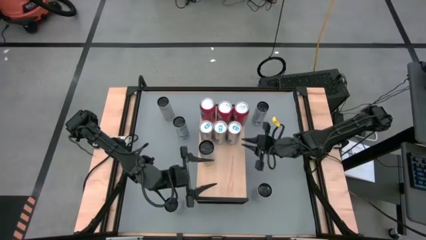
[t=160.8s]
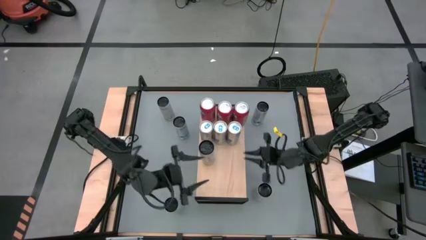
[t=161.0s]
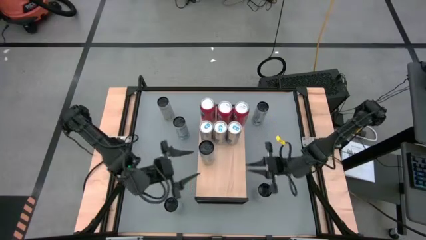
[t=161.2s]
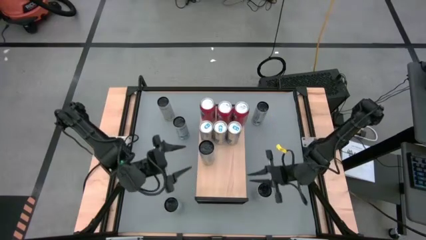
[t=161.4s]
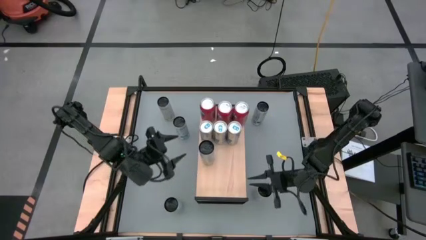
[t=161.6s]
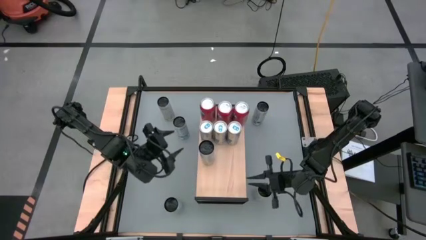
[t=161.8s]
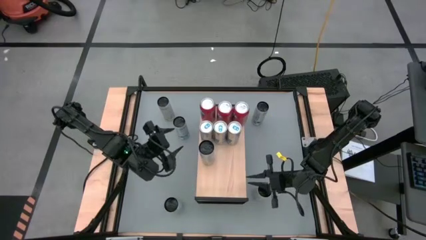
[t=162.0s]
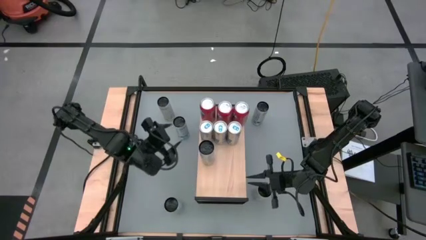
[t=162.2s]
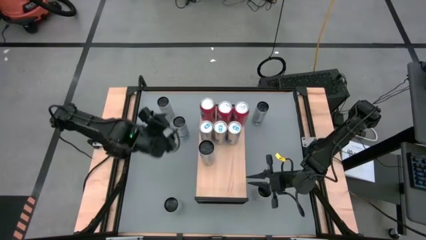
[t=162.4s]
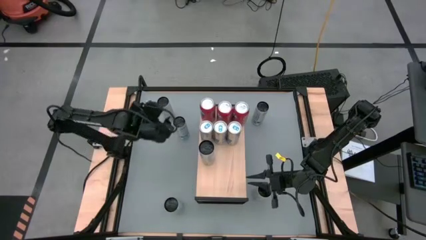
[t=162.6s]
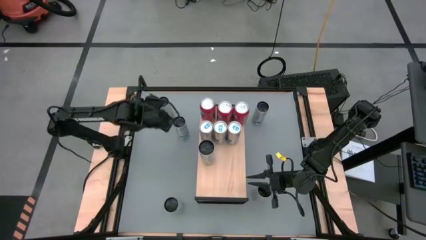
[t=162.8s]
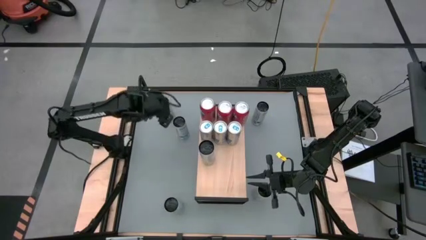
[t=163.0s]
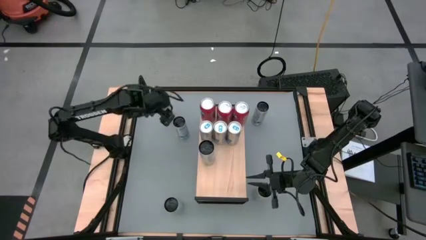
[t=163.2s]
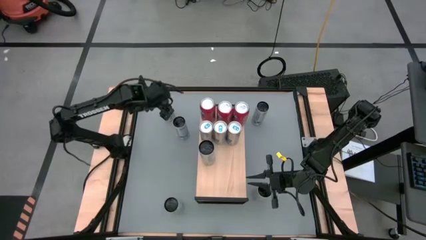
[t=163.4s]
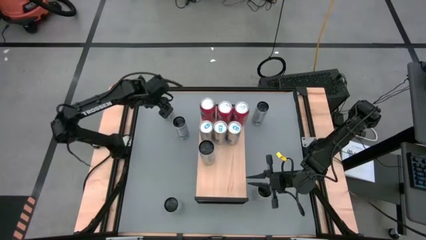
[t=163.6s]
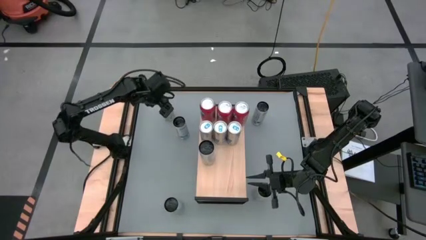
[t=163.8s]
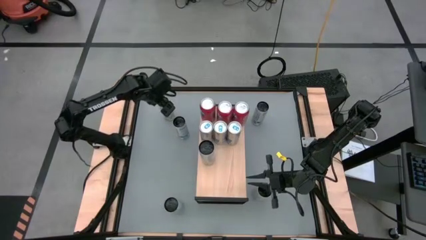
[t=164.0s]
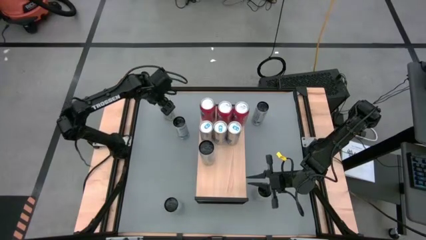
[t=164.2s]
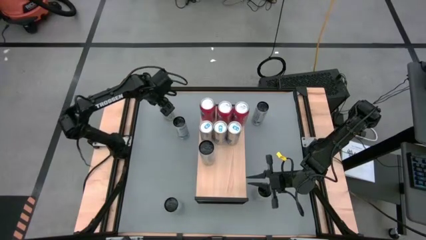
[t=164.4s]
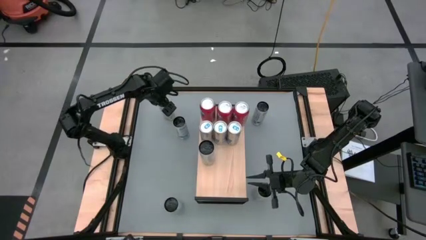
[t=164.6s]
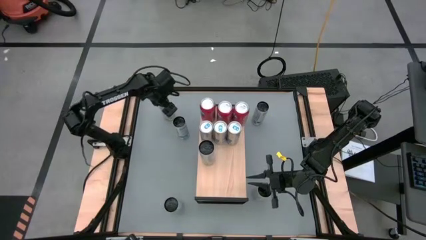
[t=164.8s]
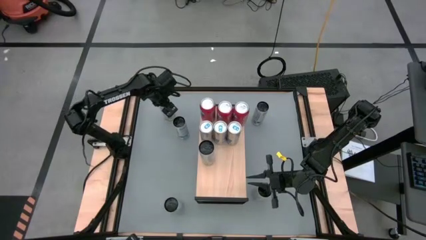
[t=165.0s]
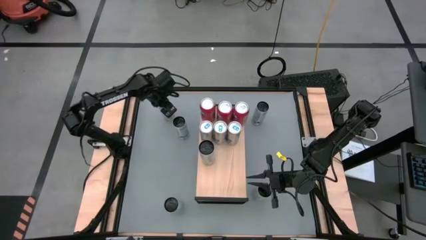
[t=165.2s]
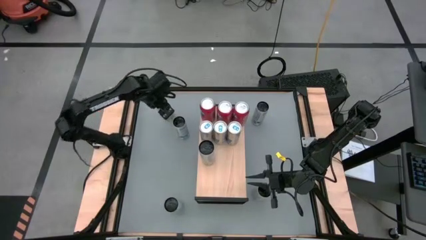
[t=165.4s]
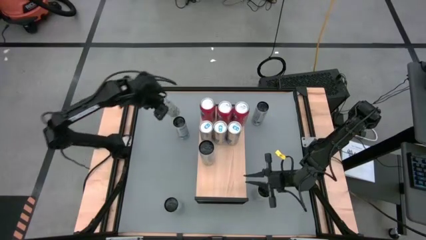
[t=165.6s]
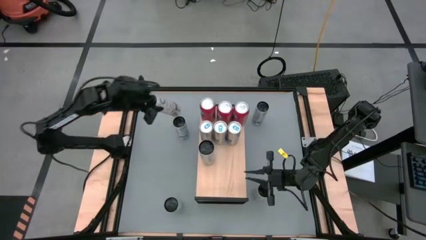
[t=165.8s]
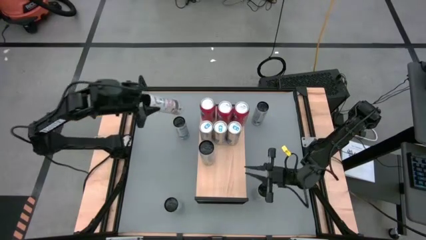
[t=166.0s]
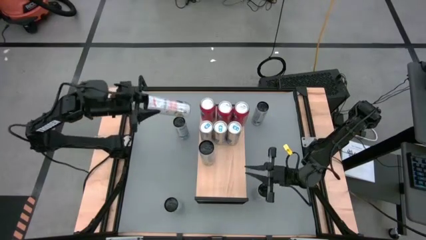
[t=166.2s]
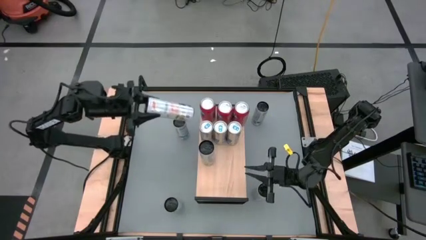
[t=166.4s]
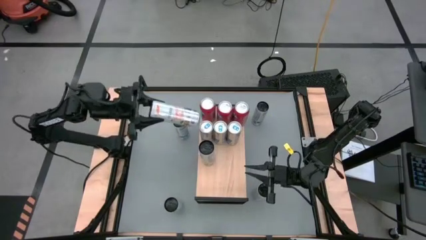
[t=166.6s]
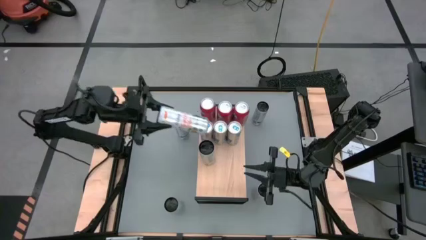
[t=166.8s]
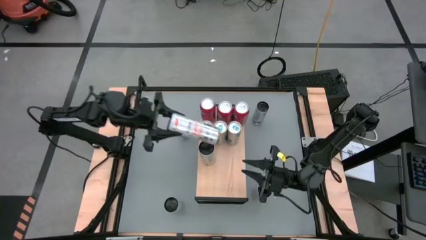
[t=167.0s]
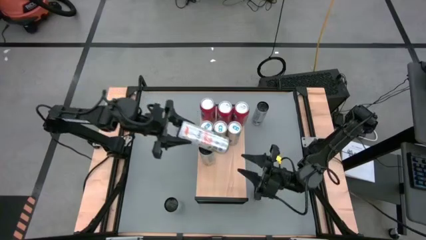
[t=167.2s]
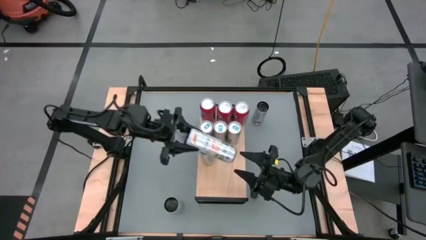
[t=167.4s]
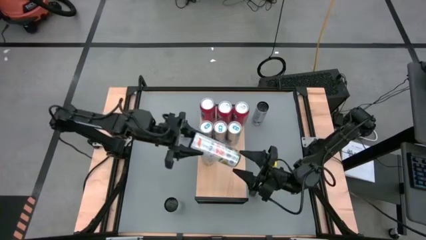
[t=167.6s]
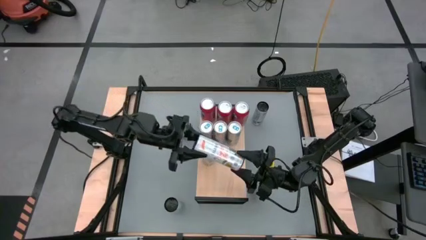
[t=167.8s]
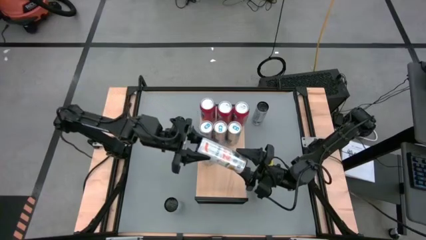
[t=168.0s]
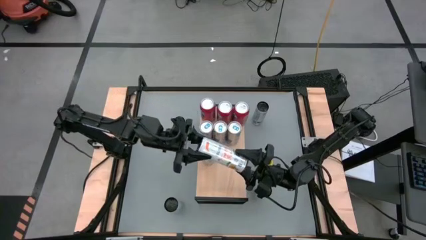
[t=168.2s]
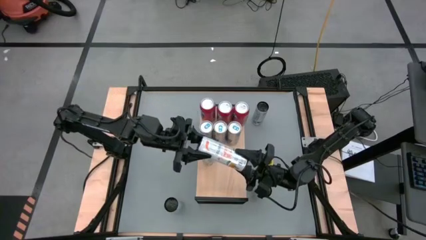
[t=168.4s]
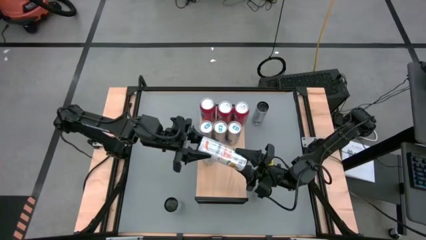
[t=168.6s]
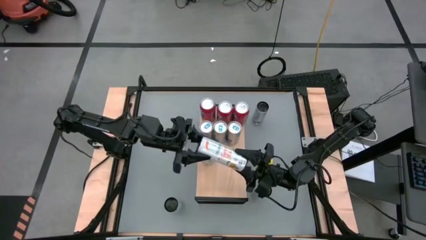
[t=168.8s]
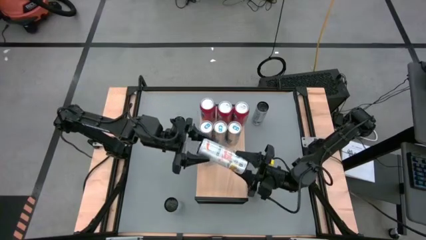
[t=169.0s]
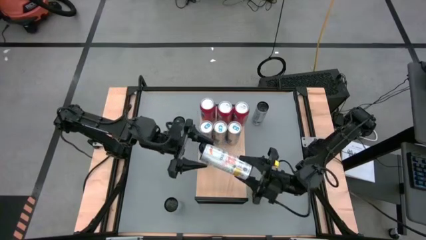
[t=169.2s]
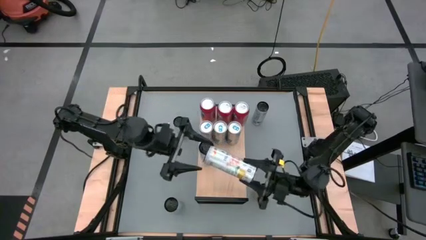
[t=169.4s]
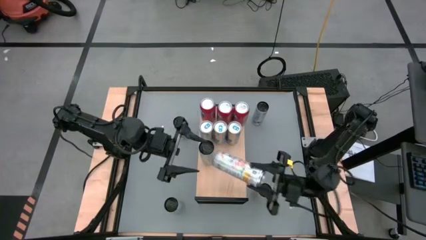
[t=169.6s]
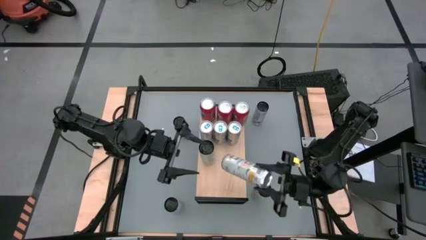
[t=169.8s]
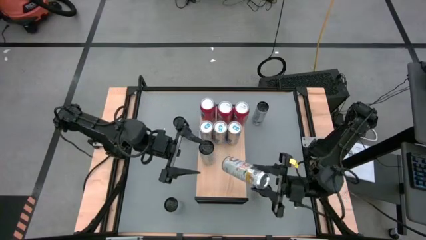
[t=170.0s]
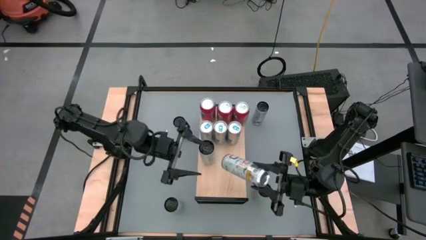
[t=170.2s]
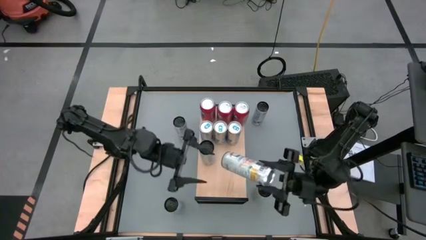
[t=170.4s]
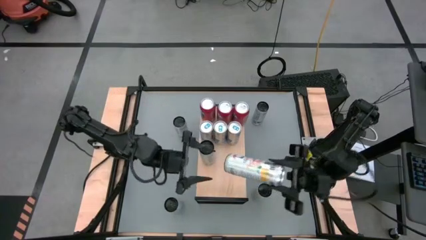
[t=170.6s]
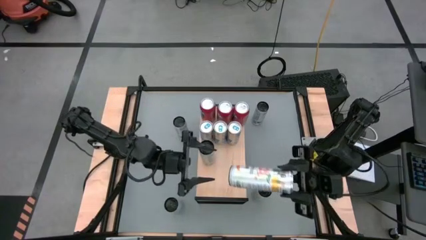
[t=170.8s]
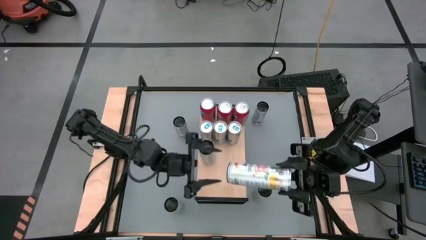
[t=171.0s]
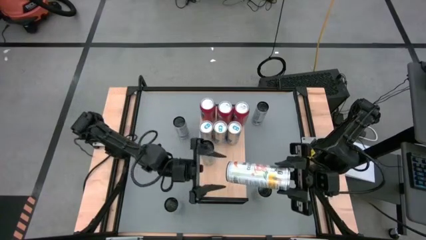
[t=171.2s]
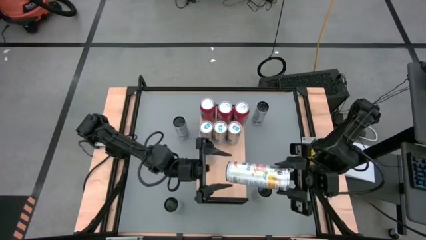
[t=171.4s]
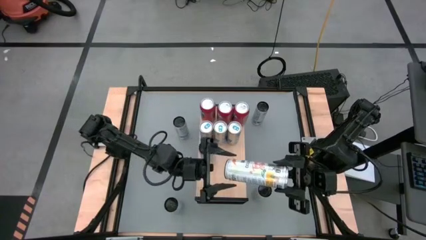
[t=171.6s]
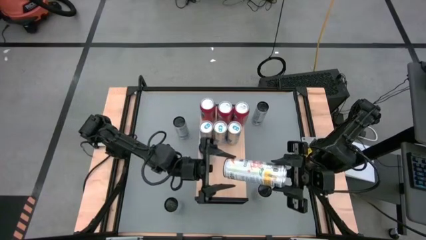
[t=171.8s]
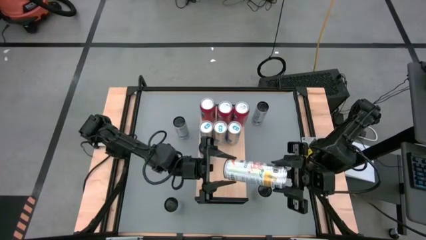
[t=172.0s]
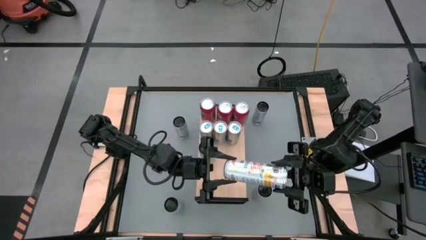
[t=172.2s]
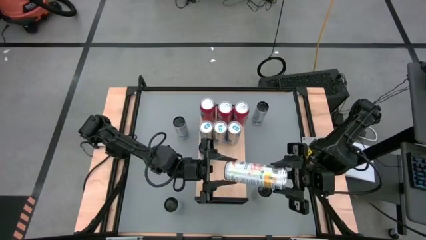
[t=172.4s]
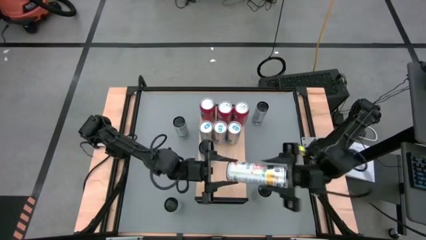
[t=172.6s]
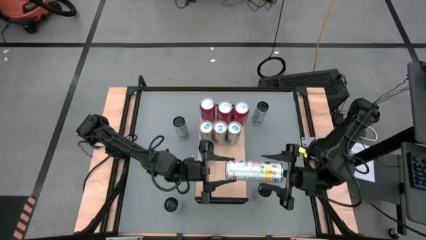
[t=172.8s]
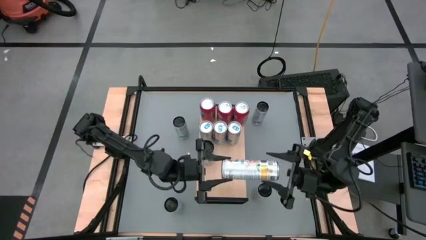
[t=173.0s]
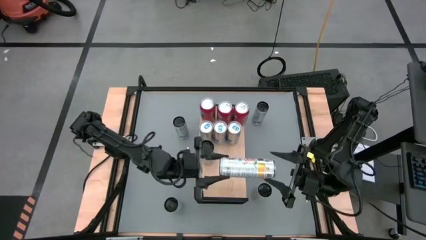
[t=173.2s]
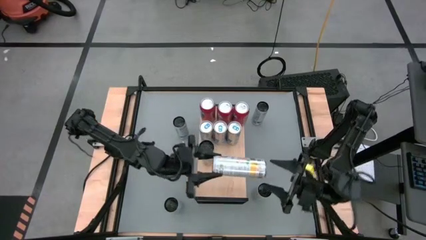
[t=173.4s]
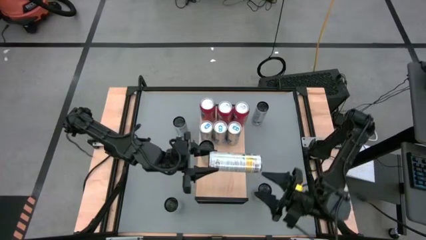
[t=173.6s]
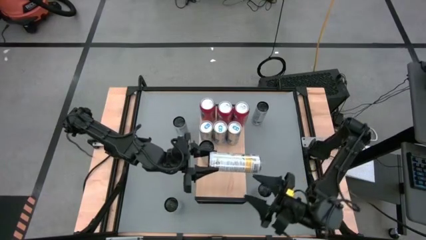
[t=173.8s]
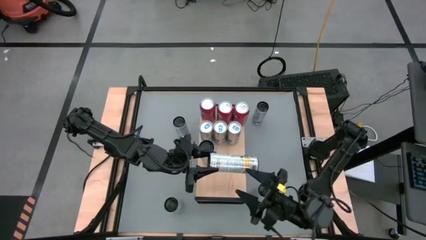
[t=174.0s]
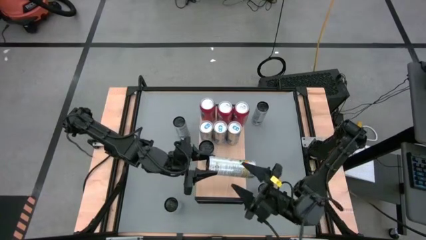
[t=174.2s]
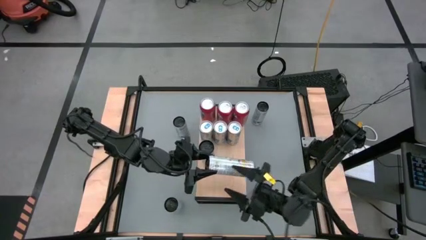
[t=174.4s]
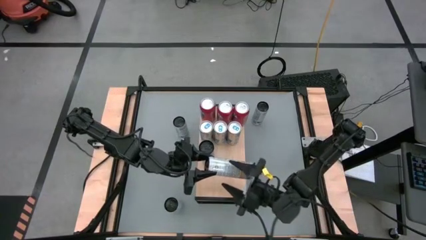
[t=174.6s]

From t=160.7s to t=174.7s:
Task: Place canned beverage on shelf
Put the top left white soda can on the shelf aligned with the other blue soda can
